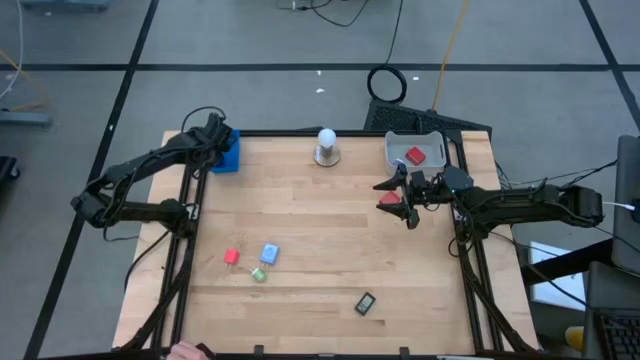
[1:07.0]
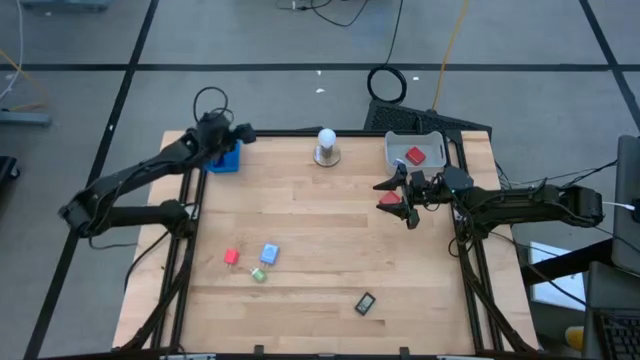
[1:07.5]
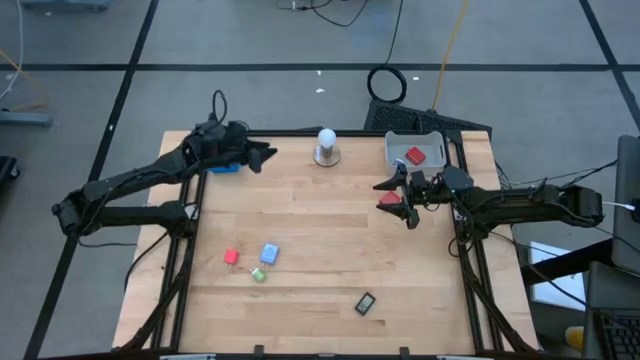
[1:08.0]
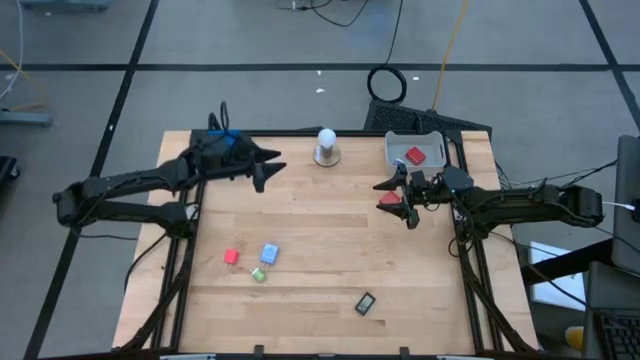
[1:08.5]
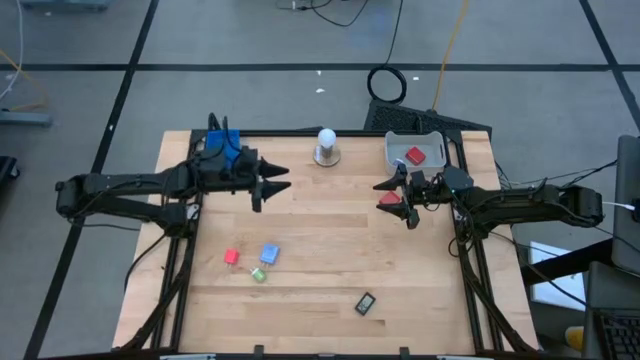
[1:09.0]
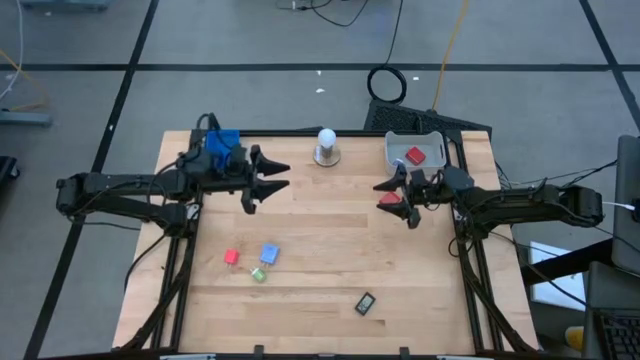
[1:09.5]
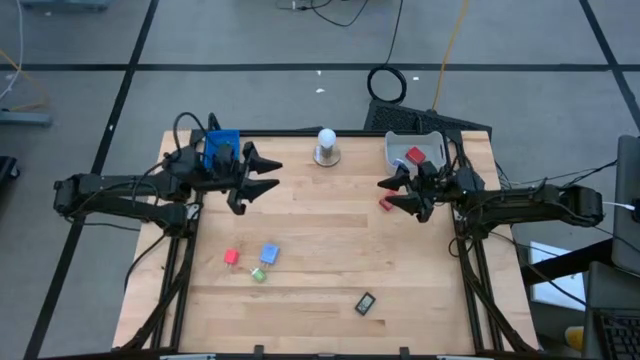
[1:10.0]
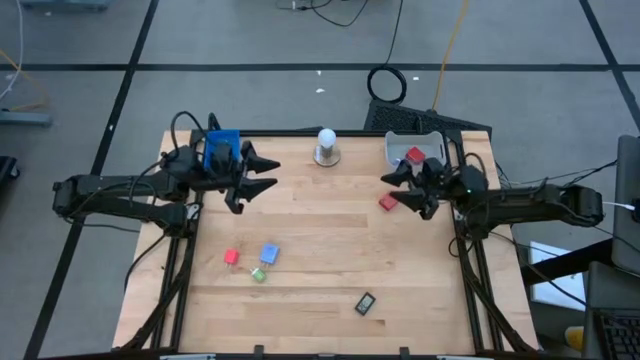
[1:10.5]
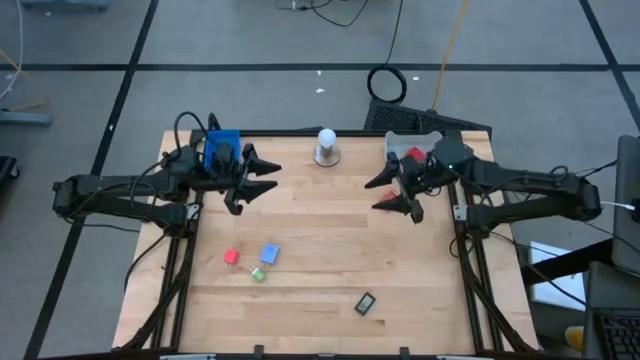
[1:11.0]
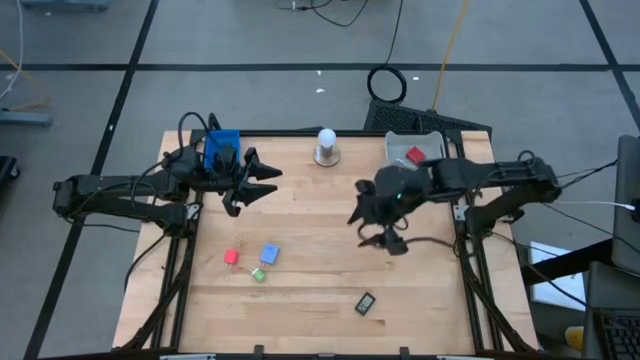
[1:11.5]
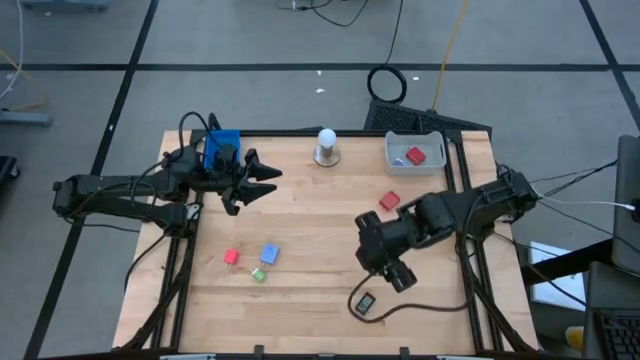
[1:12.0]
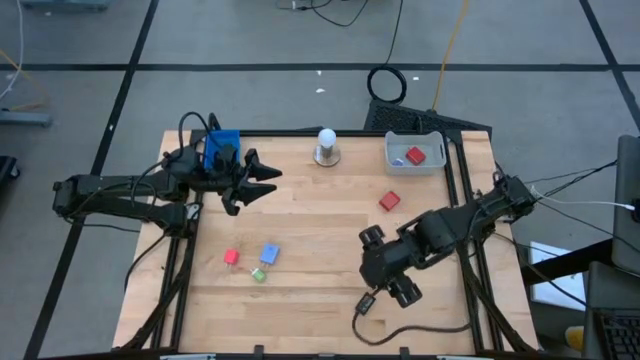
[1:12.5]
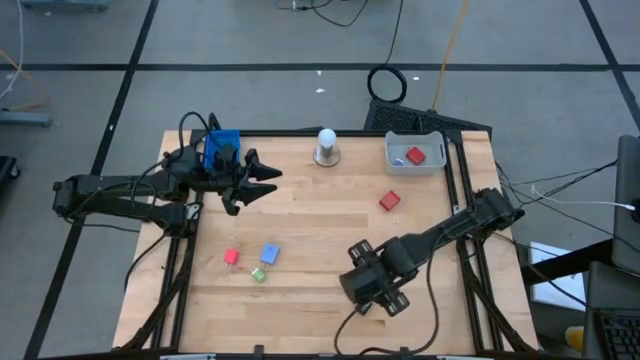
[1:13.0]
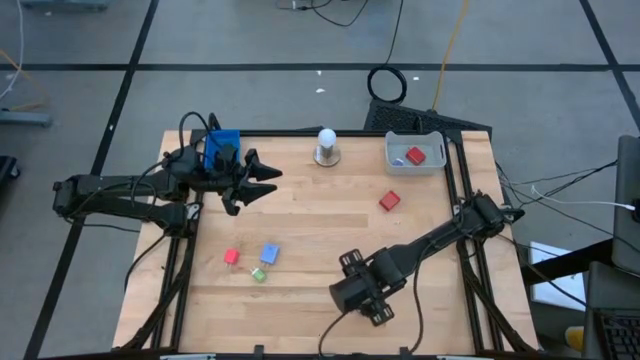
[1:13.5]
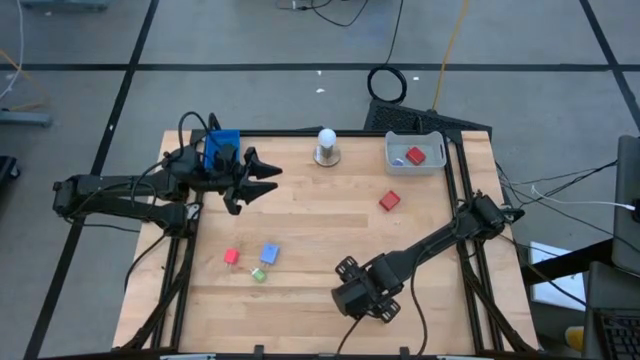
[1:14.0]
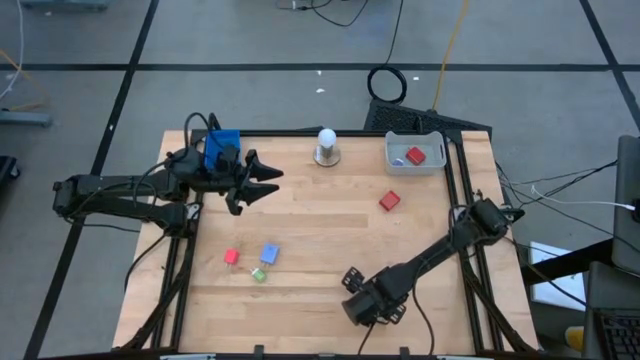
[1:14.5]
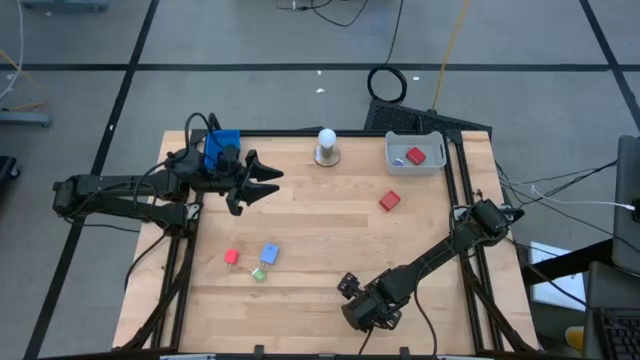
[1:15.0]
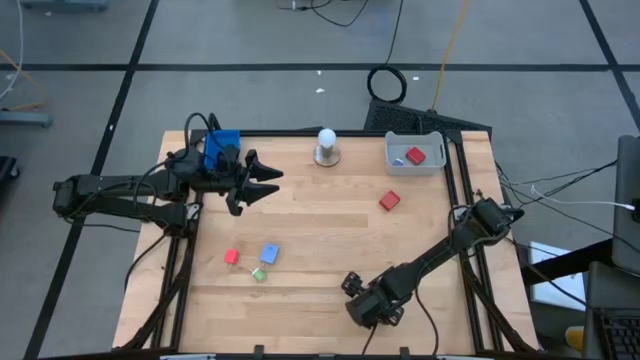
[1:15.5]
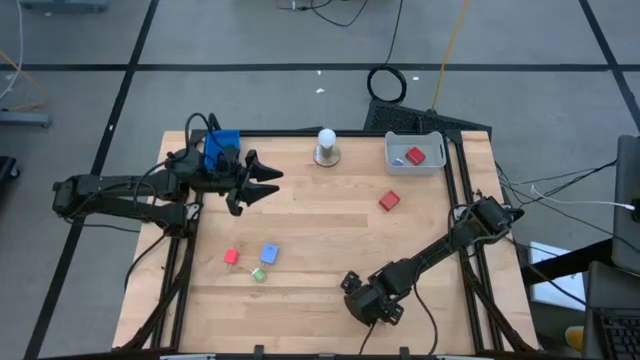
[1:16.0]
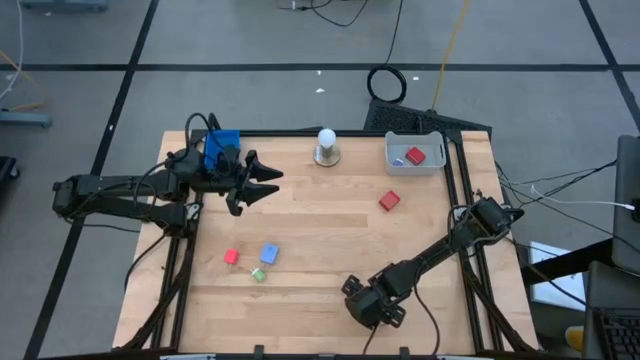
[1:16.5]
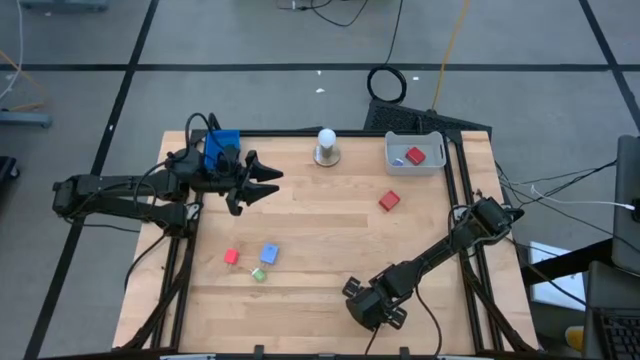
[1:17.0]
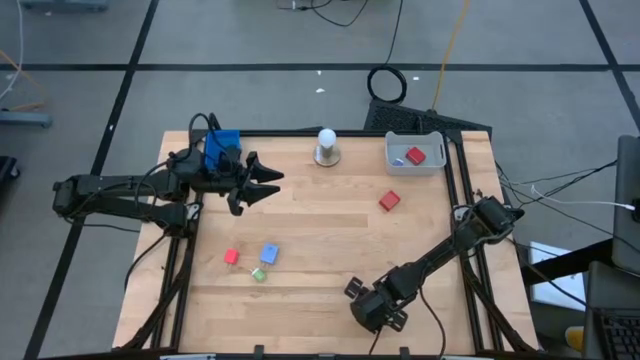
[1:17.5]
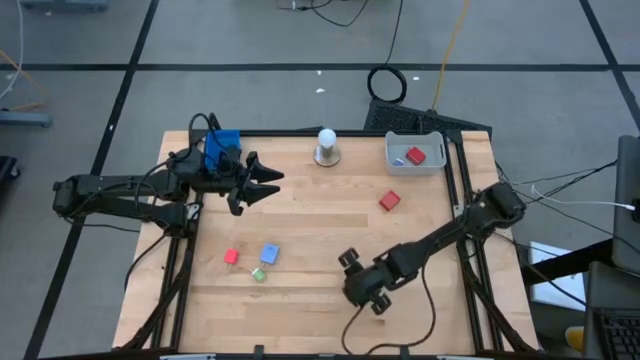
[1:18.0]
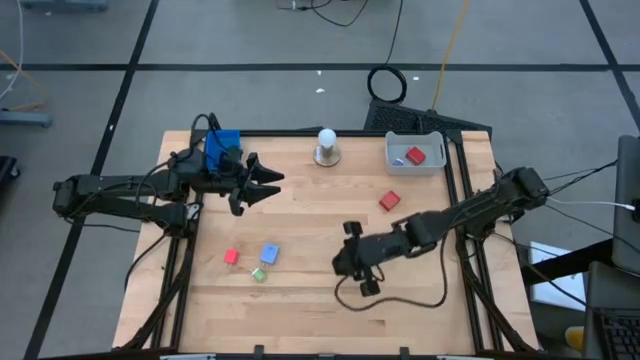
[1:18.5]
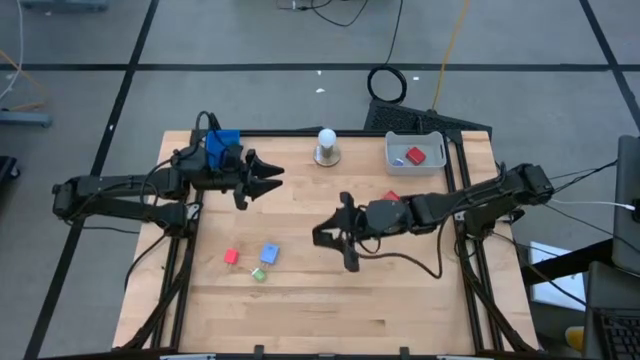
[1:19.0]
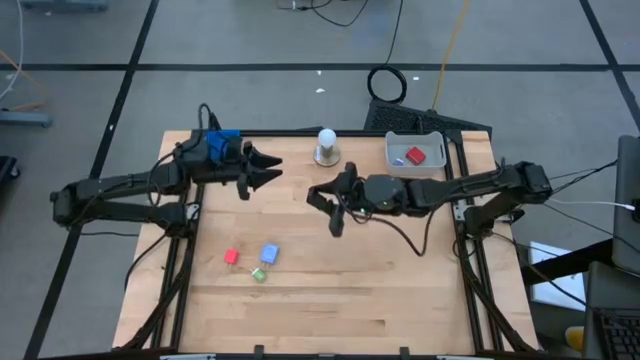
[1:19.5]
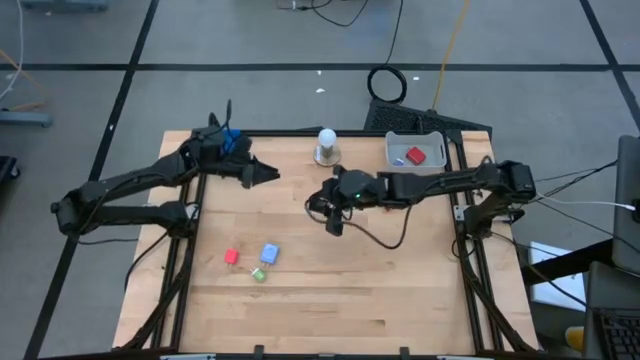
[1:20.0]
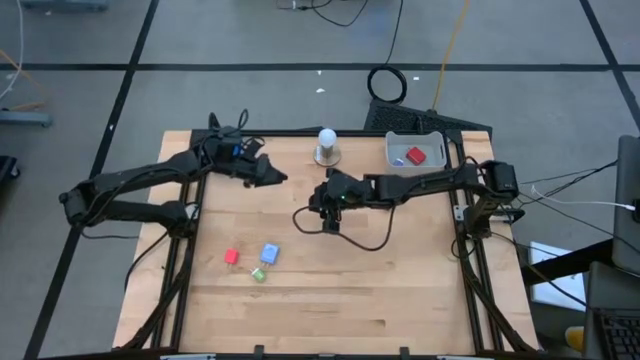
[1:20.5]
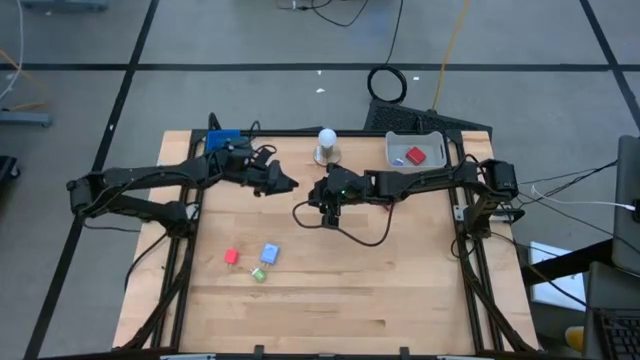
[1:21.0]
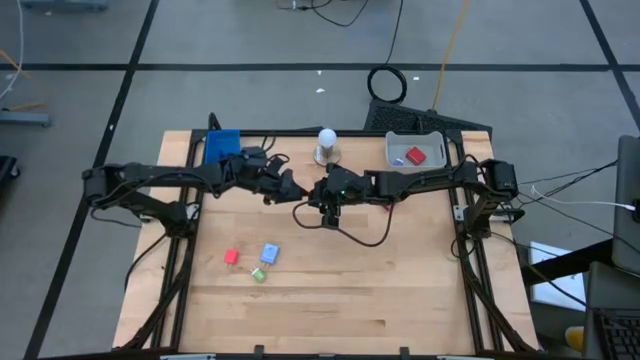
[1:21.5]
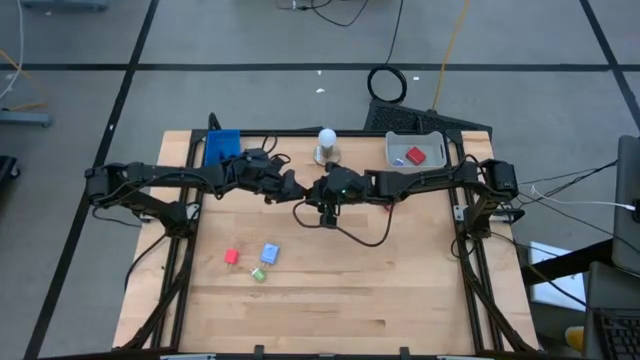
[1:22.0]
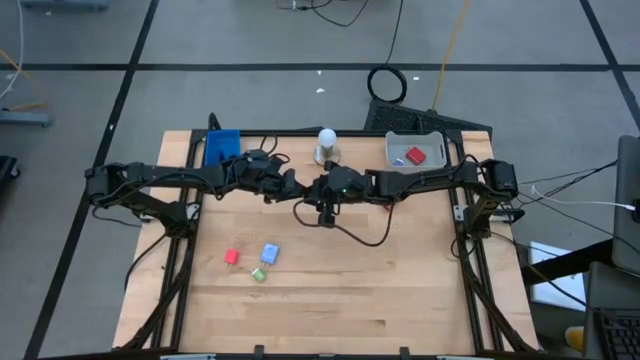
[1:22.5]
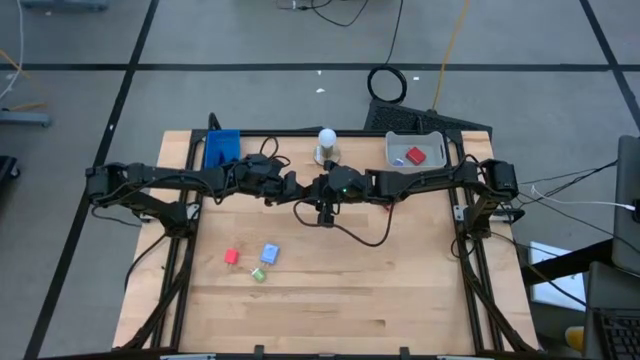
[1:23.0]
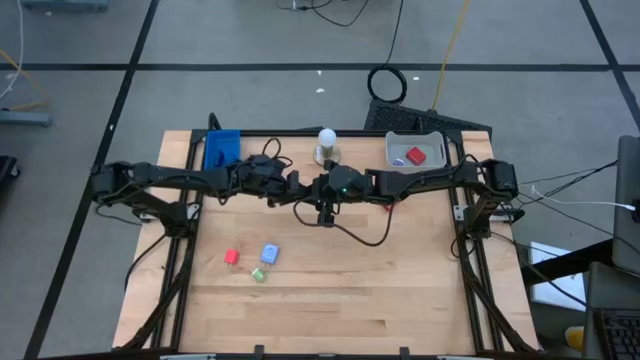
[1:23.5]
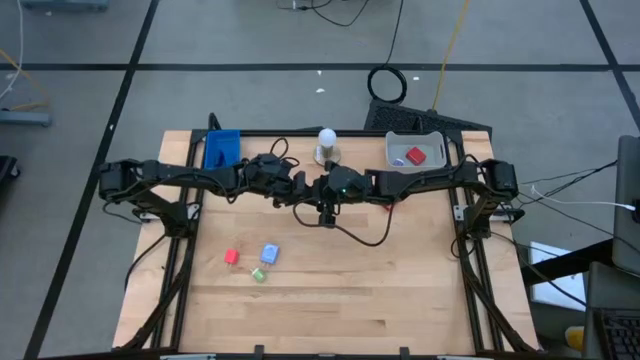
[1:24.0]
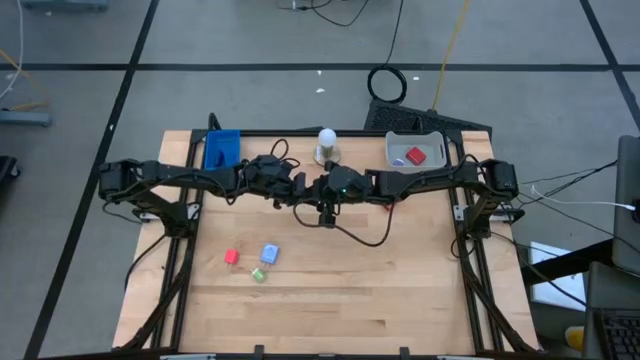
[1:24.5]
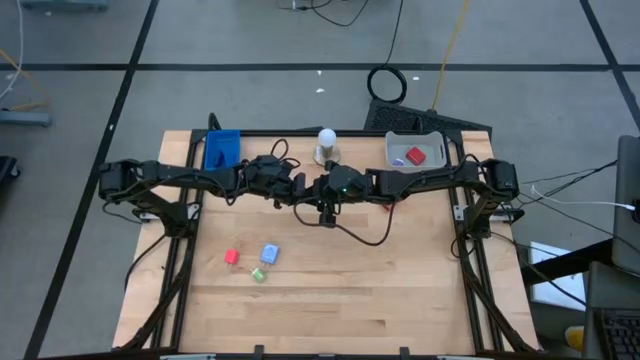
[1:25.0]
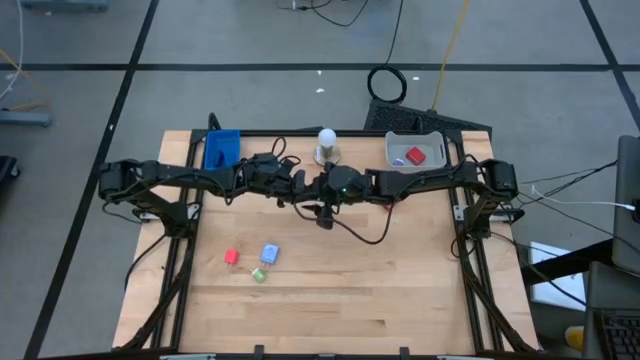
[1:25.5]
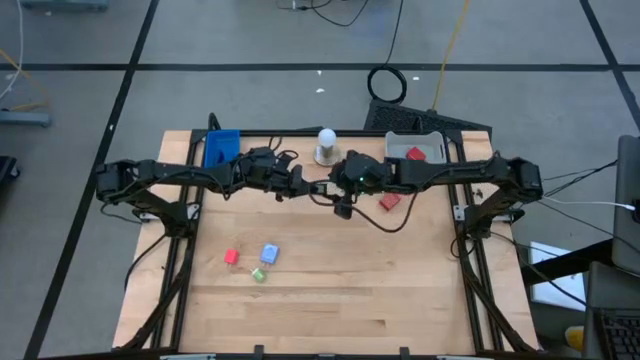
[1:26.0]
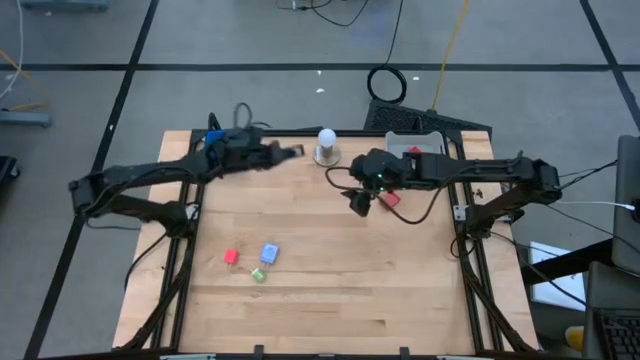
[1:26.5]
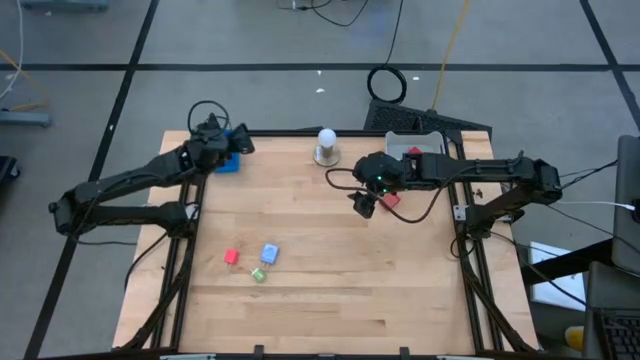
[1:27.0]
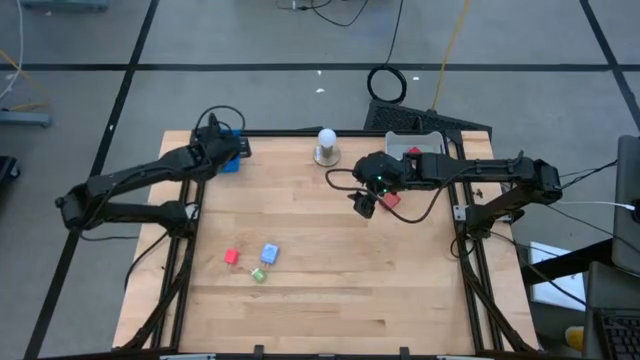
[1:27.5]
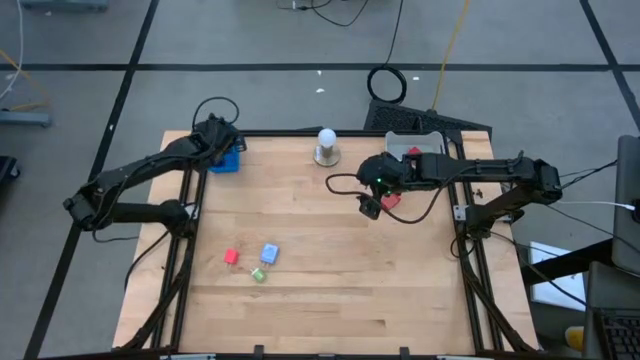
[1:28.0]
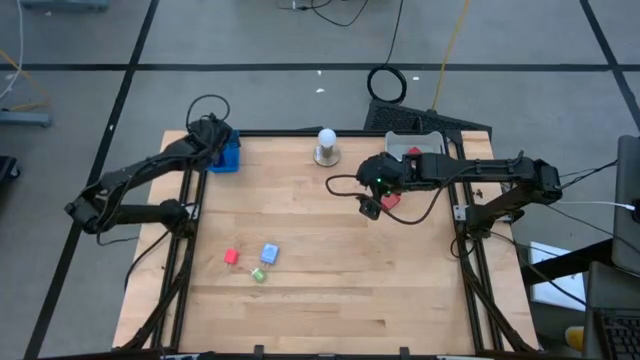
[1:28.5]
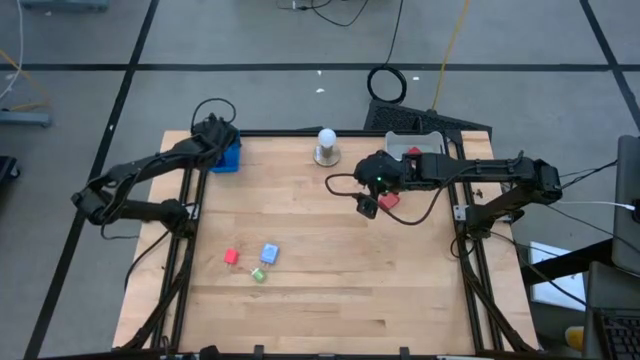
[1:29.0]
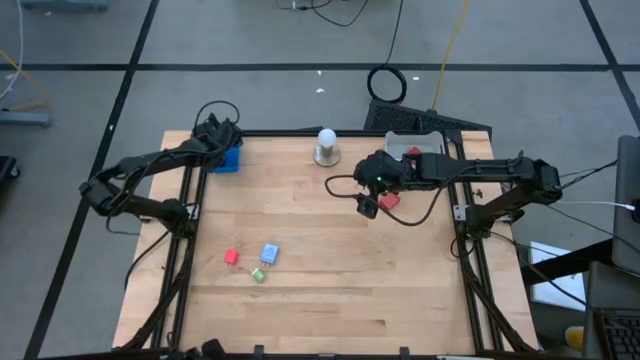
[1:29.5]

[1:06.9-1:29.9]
Task: Pick & Place Office items
Put the black digital clock into the blue bin
